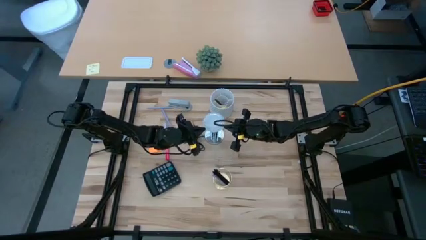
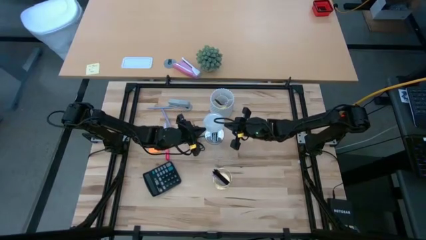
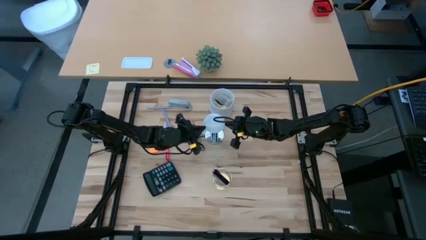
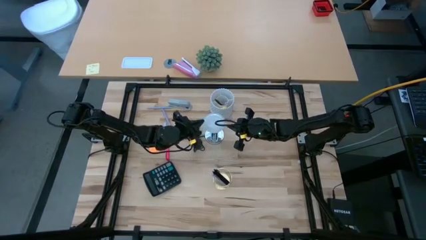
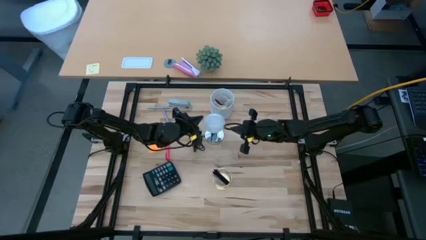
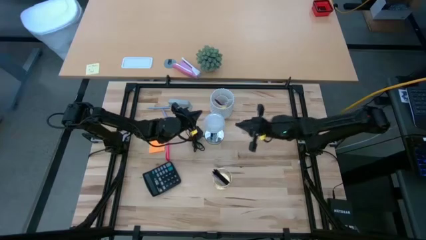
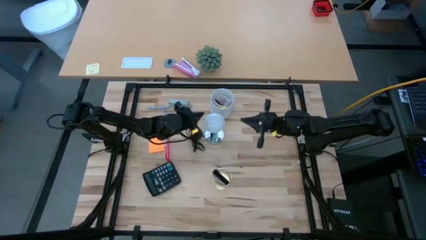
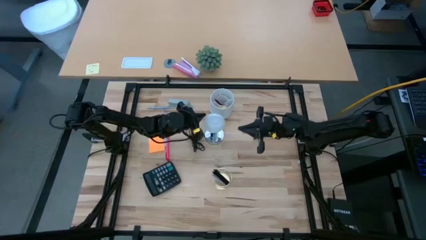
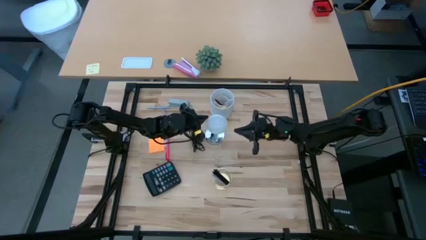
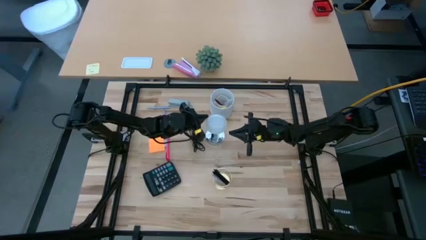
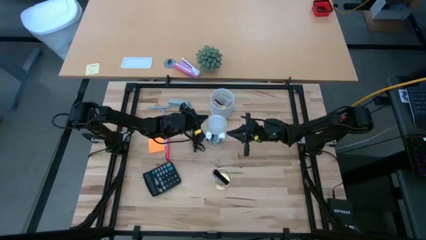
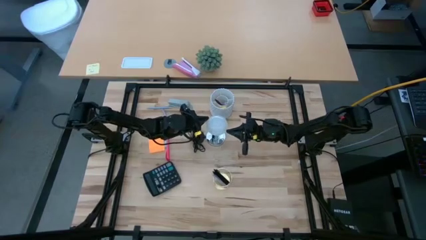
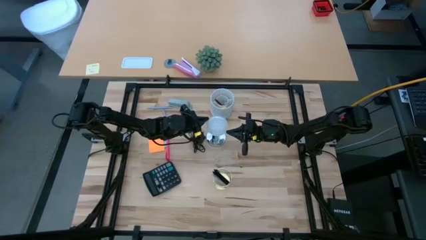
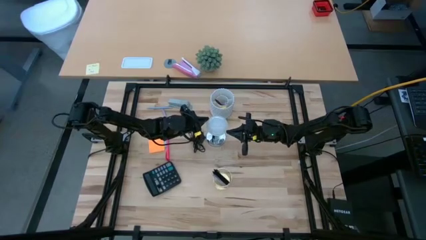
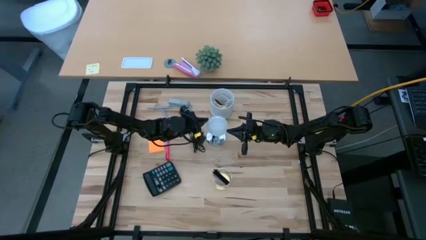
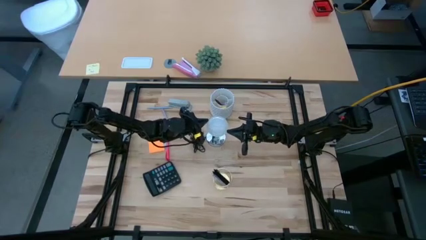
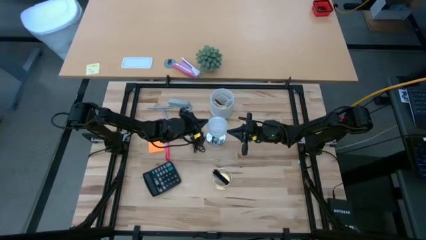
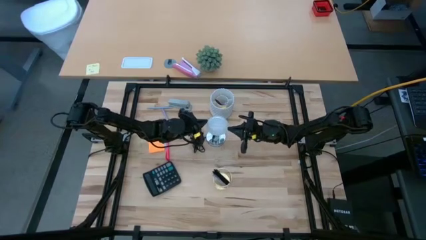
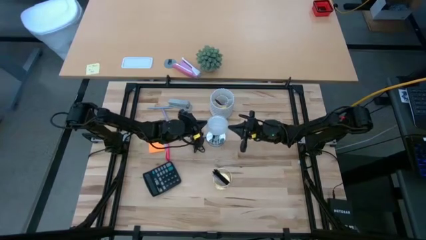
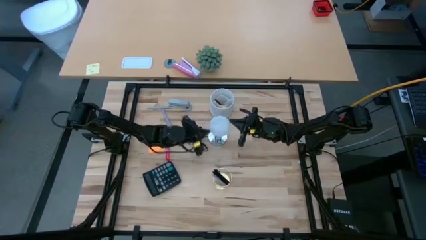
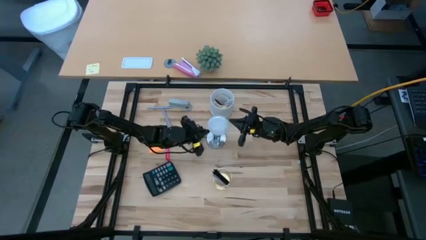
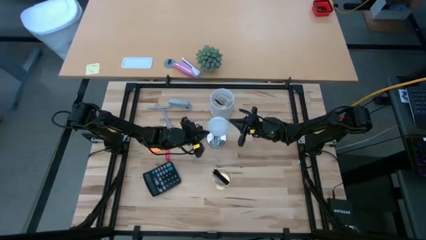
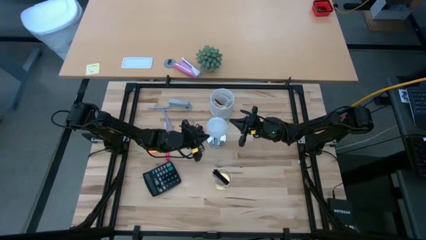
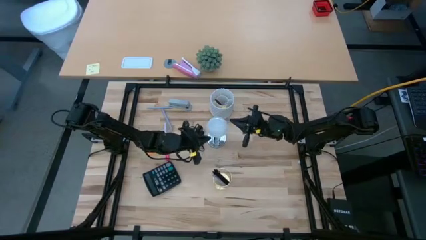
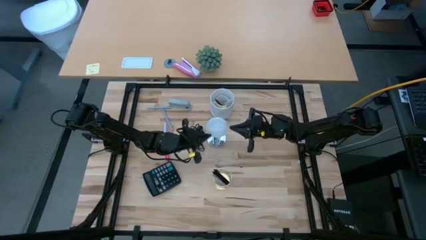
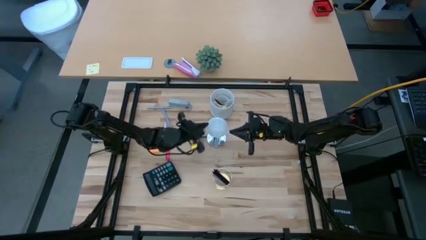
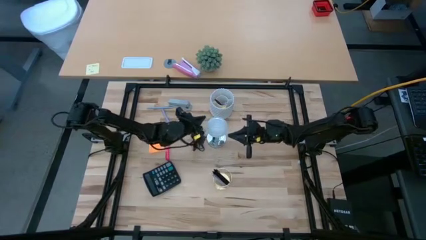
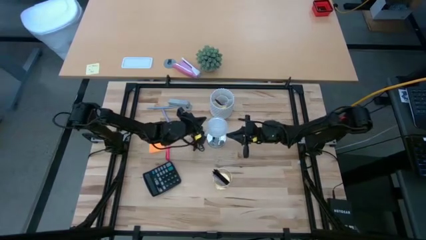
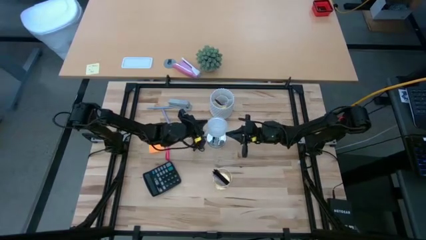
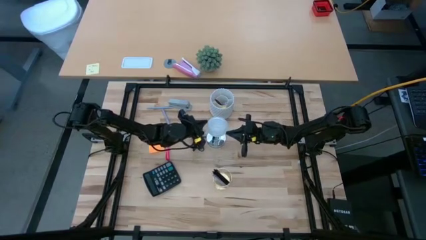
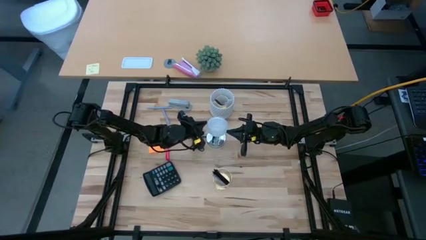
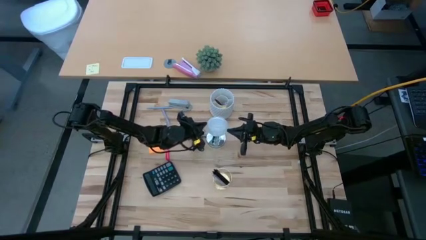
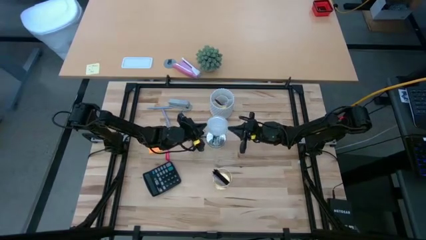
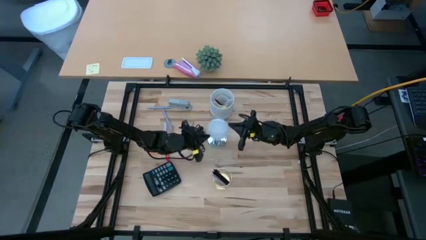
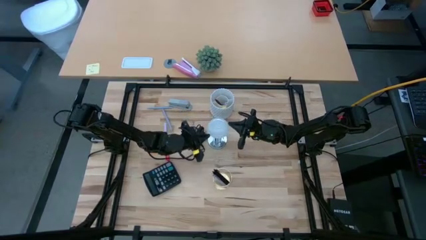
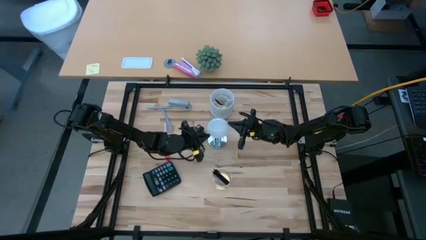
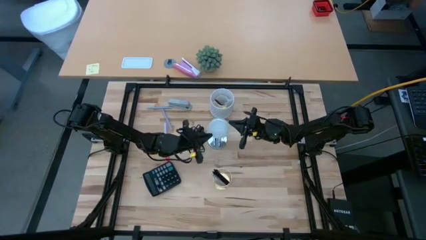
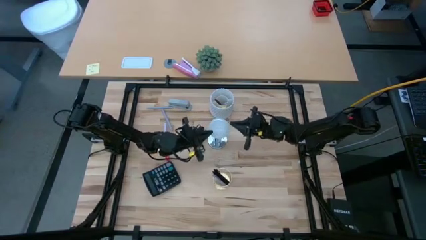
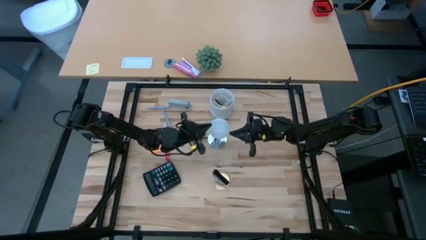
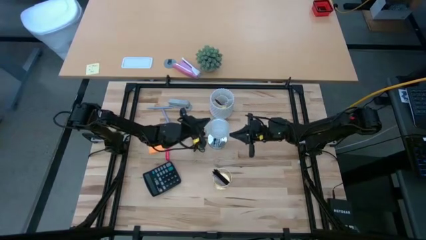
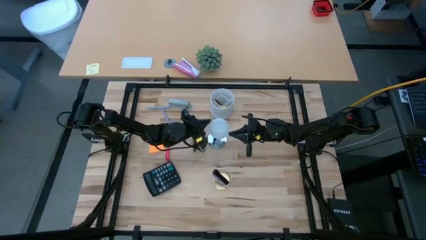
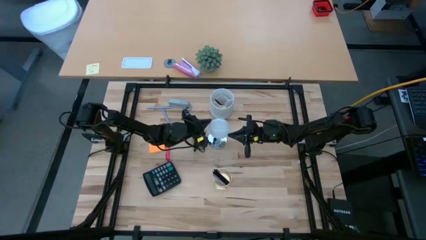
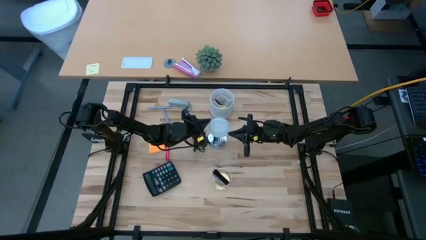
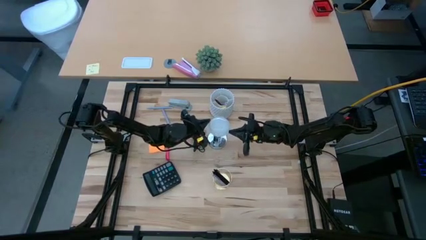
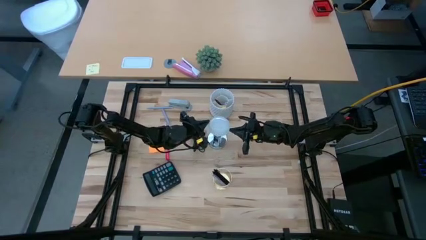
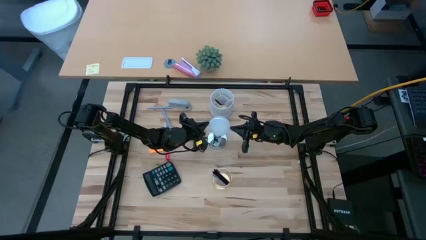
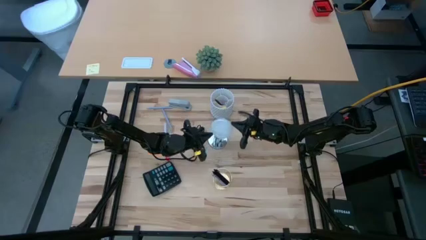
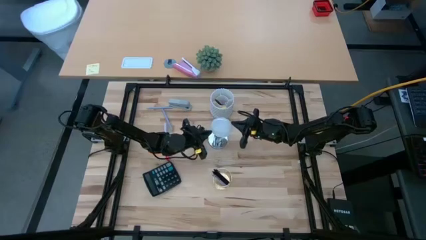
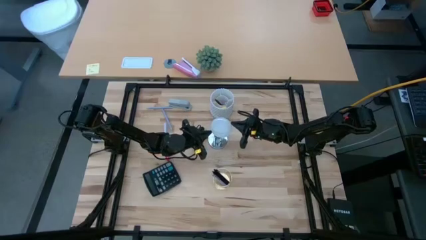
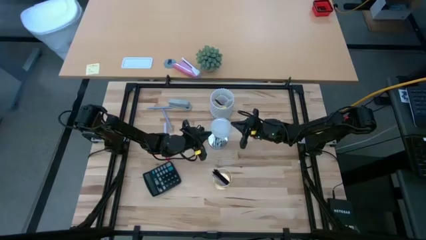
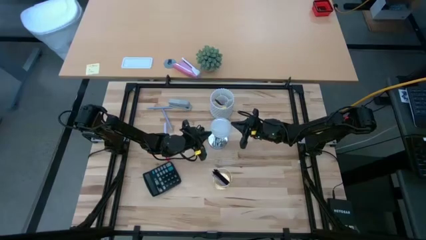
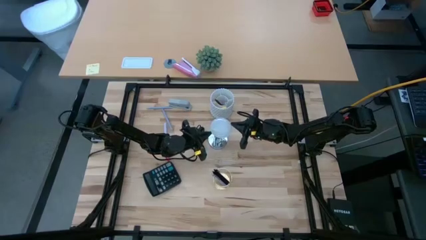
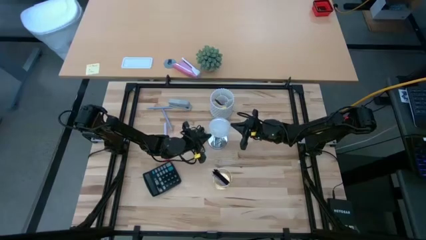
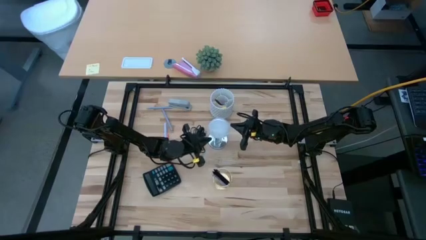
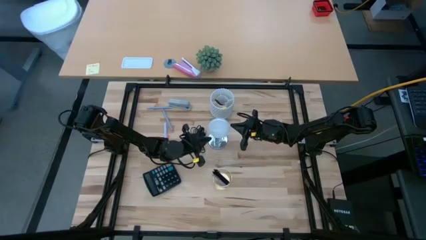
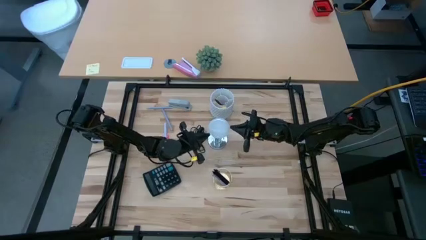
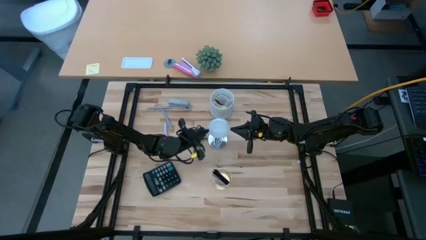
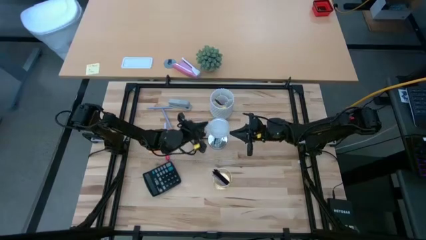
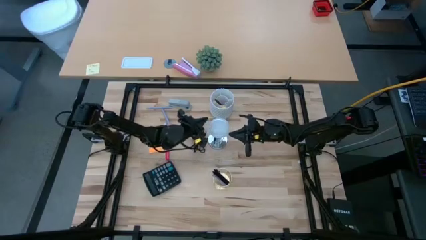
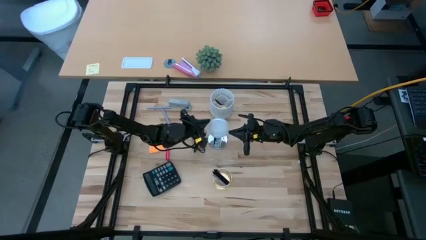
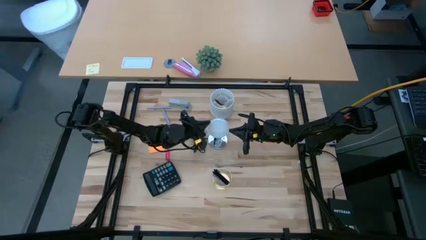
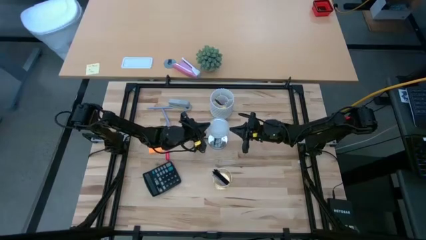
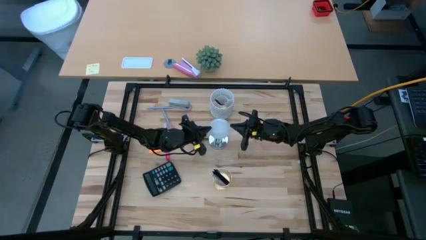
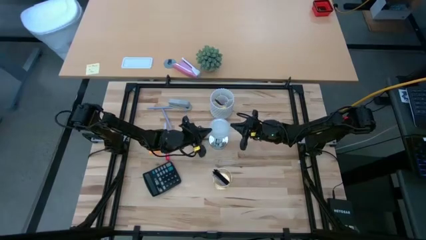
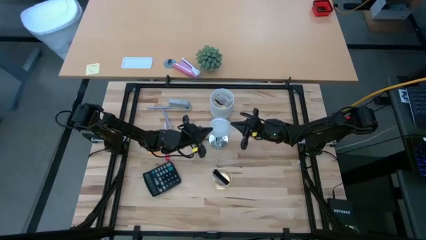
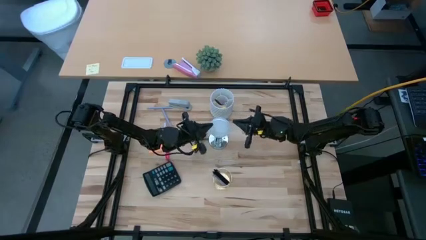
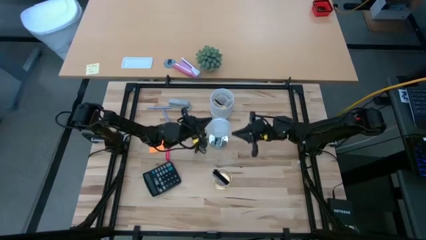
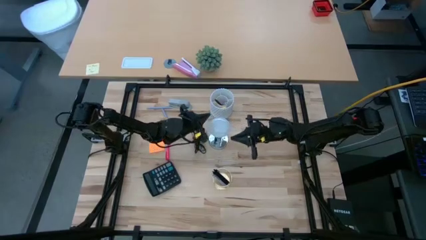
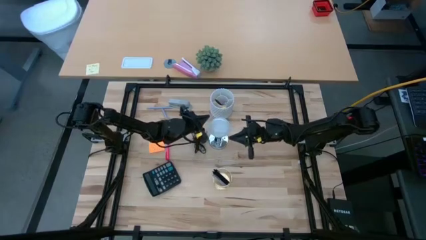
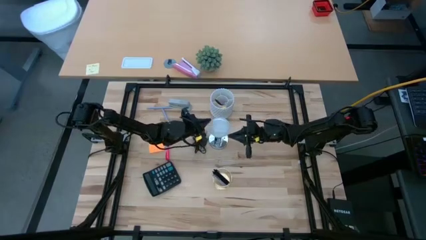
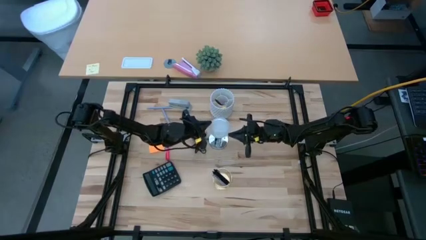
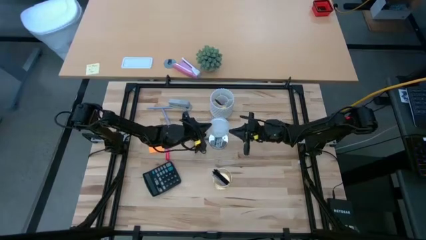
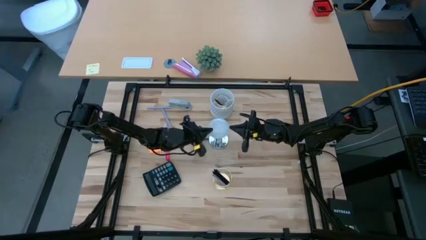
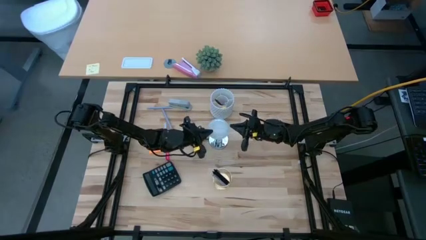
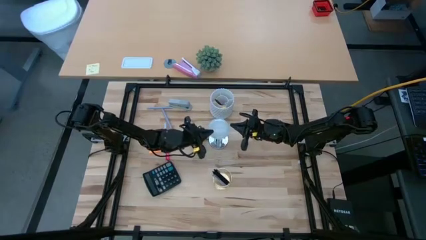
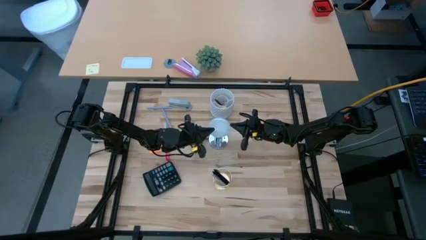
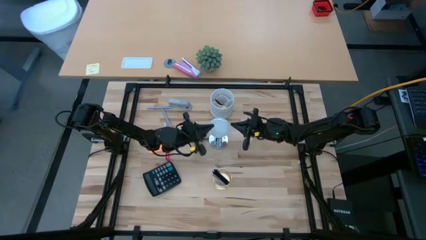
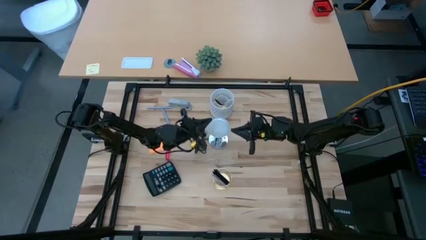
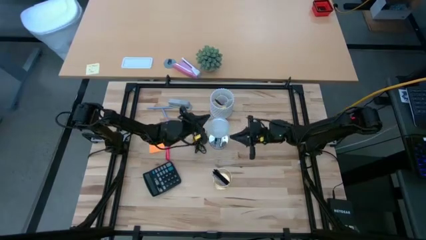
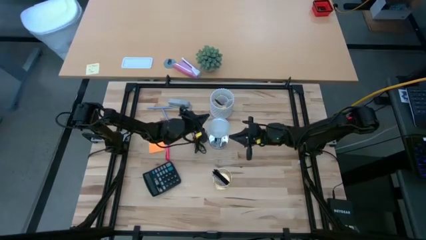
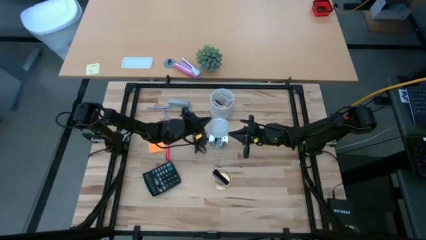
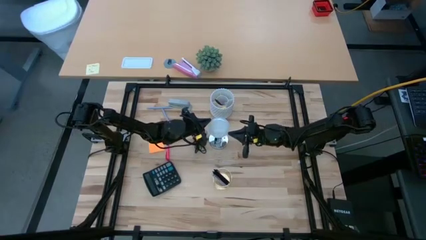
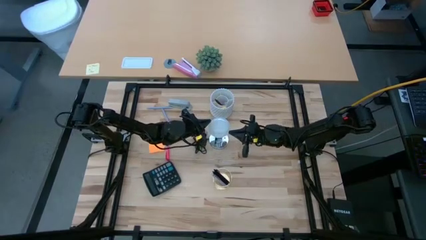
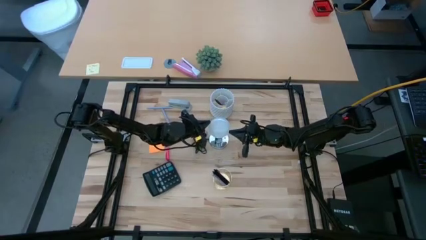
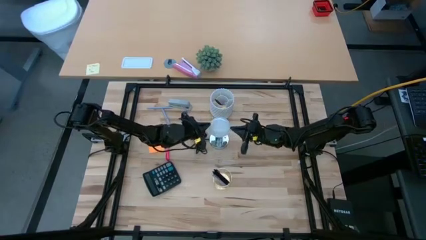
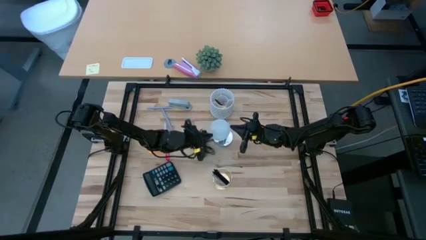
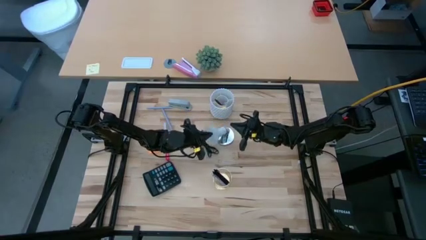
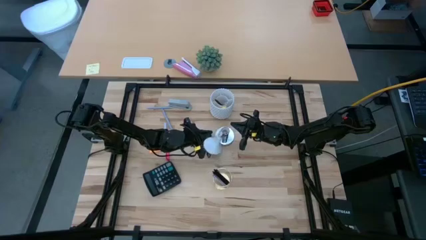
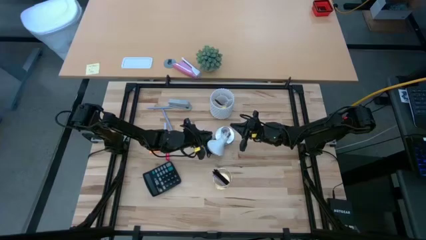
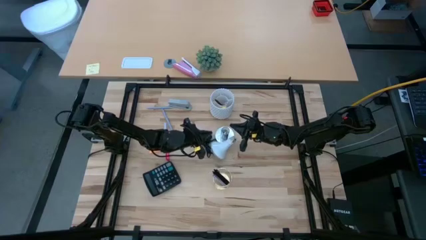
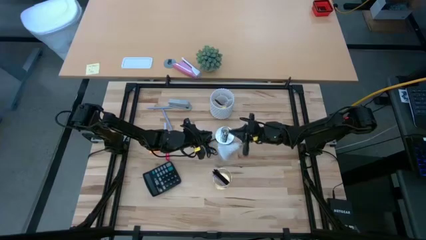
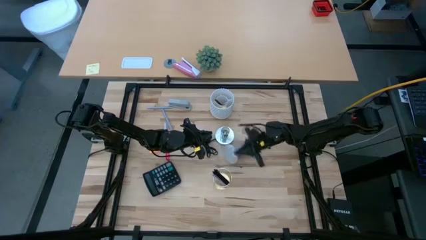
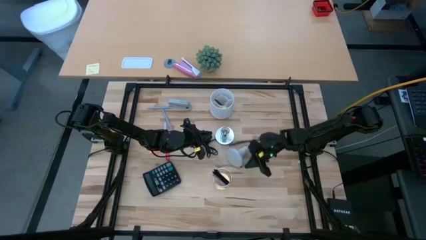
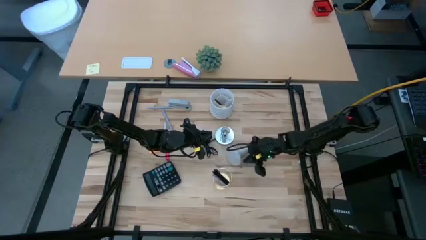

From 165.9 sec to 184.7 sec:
Task: Screw lightbulb
Remove the lightbulb from the lamp
